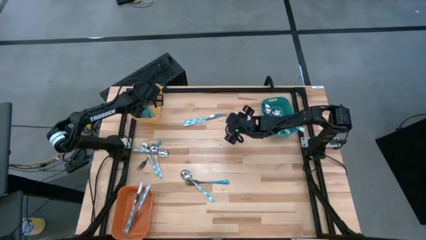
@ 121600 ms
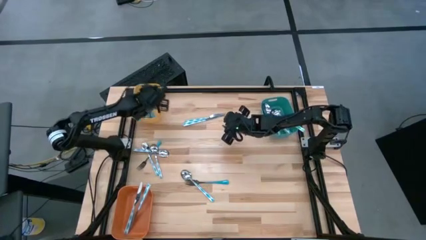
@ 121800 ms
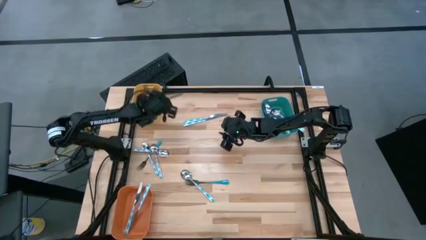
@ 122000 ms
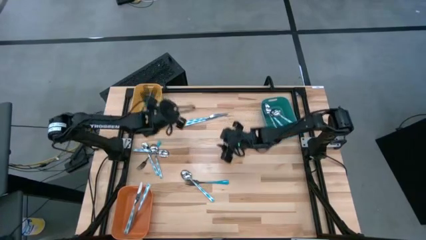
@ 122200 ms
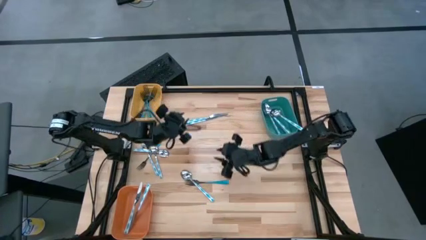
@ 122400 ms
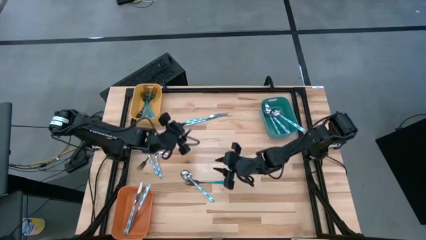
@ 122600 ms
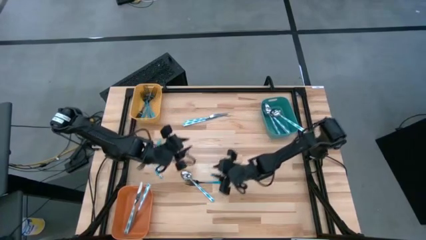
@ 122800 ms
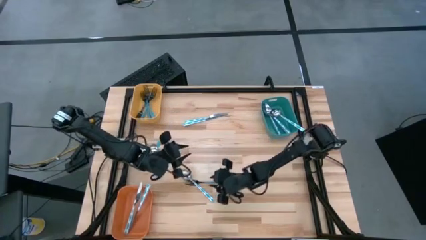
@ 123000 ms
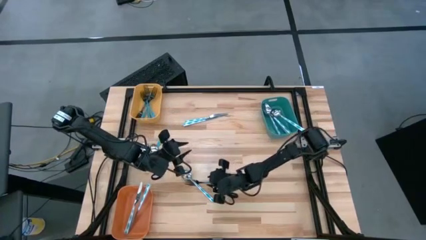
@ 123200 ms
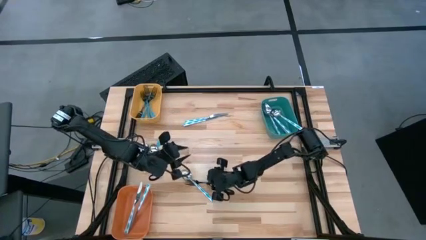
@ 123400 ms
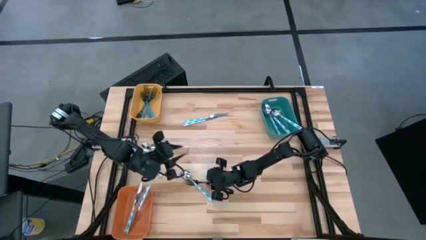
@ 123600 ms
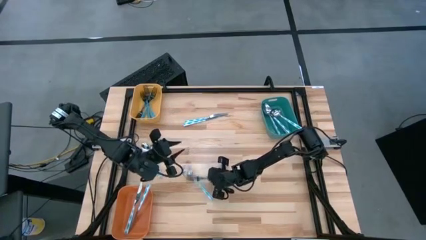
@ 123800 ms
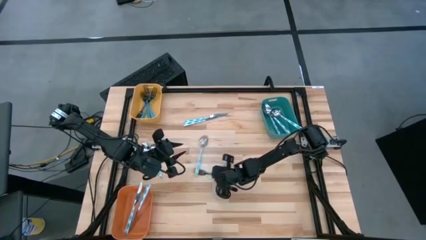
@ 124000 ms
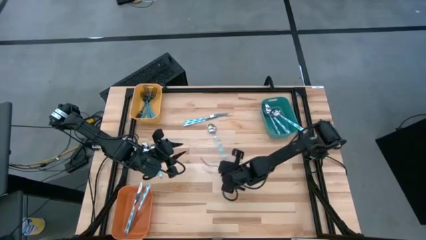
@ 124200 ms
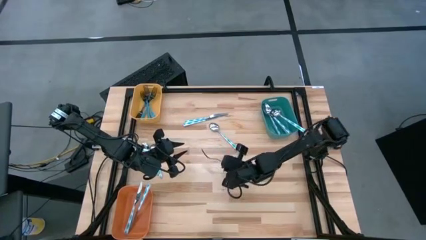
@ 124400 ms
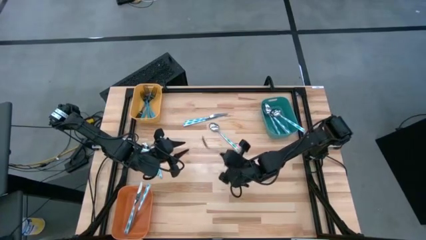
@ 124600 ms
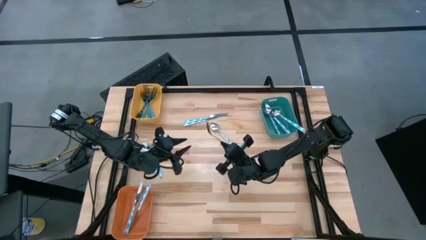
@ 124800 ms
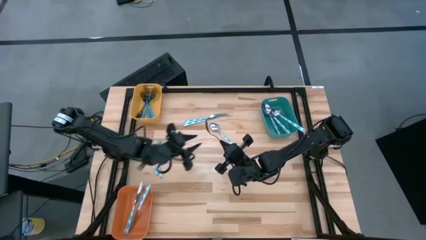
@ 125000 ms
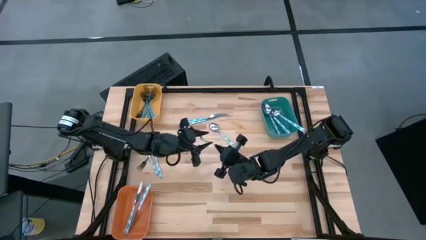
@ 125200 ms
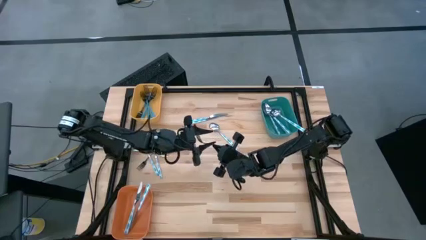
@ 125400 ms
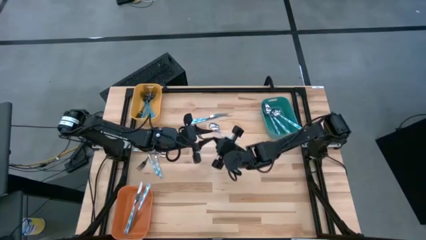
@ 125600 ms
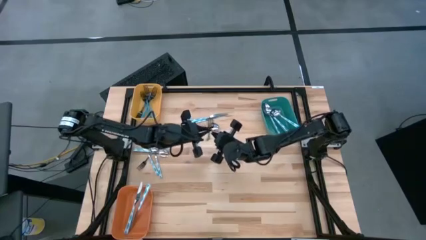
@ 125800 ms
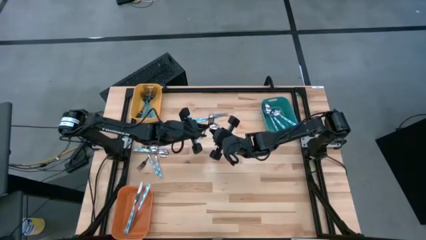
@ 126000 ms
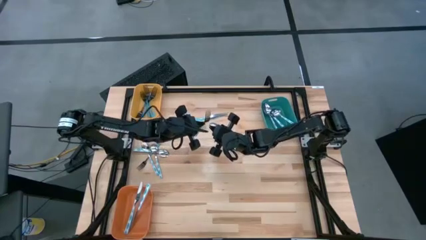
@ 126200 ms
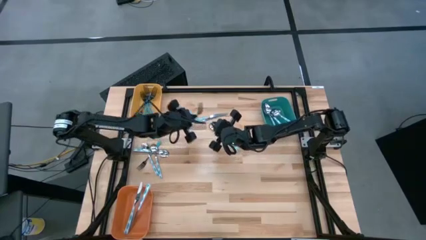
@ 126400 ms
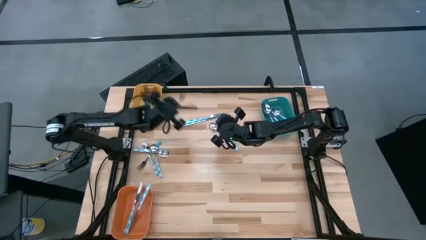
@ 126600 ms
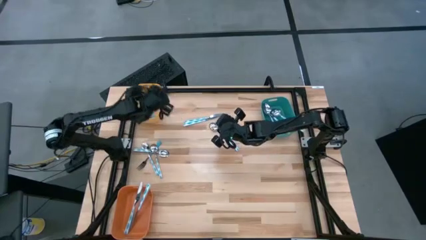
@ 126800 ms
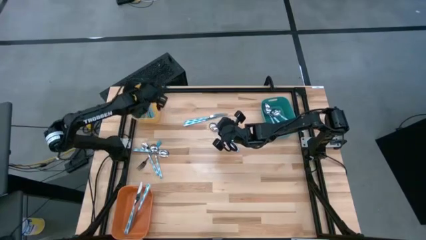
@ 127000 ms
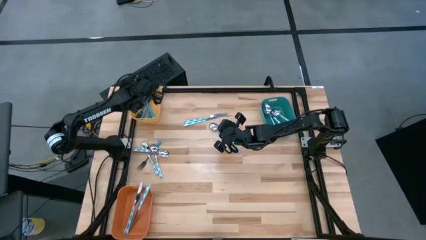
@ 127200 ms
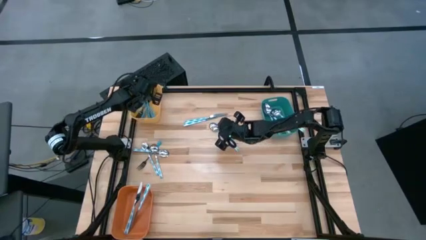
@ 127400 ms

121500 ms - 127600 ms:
Task: Sort silverware by color (type)
Put the blue fork into the yellow bin

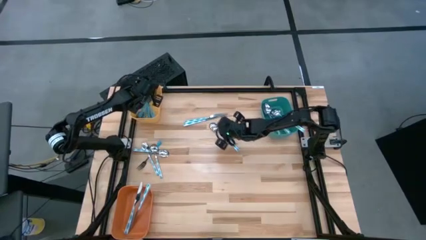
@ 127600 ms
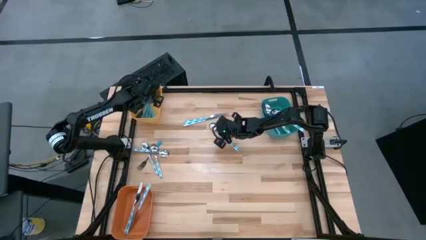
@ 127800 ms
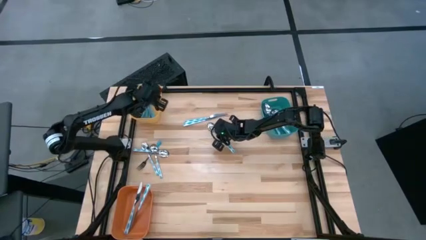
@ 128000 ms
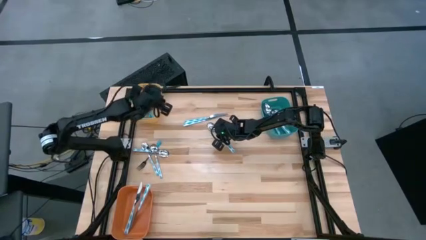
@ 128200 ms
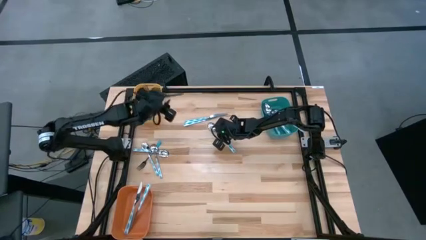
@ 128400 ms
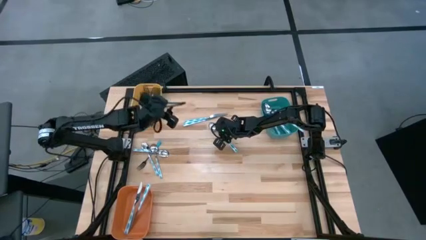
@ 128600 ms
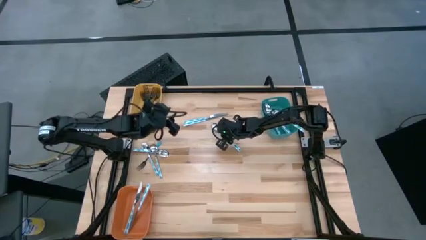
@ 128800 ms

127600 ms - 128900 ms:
Put the white-blue spoon into the blue bin

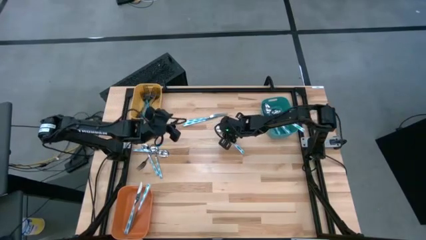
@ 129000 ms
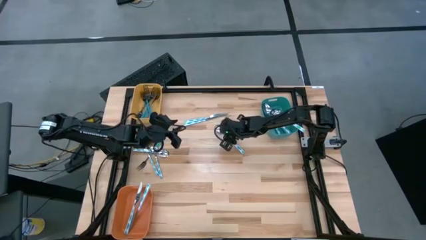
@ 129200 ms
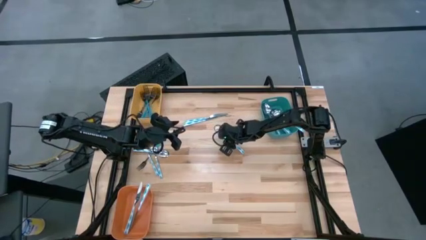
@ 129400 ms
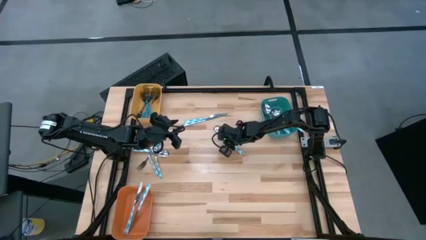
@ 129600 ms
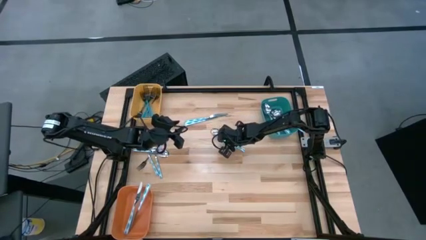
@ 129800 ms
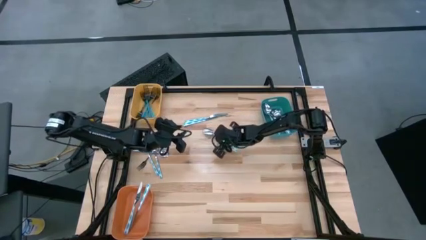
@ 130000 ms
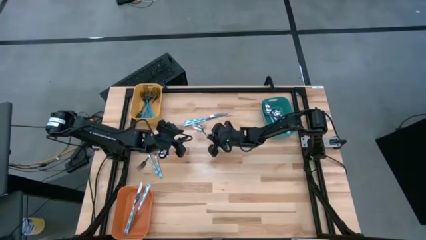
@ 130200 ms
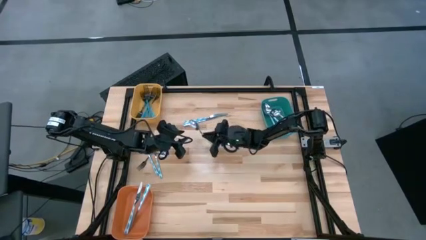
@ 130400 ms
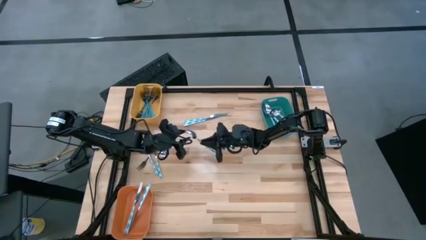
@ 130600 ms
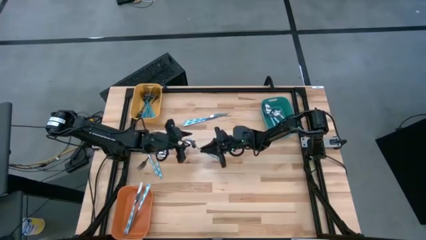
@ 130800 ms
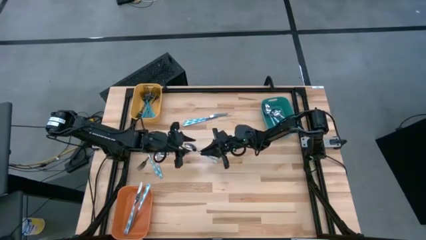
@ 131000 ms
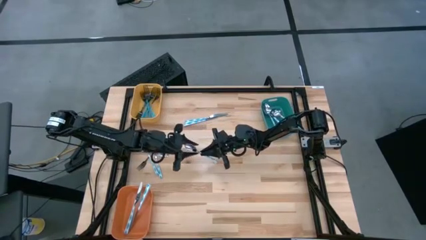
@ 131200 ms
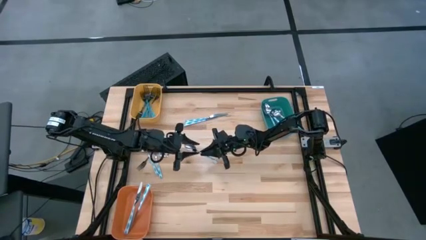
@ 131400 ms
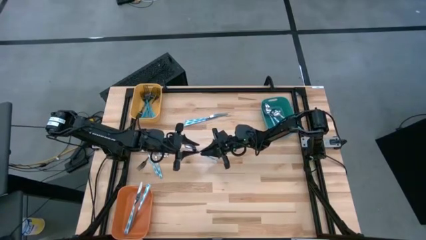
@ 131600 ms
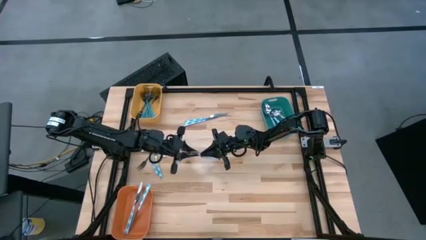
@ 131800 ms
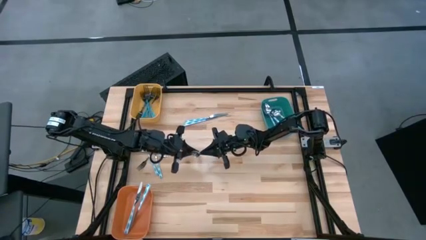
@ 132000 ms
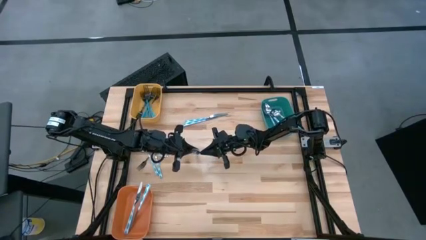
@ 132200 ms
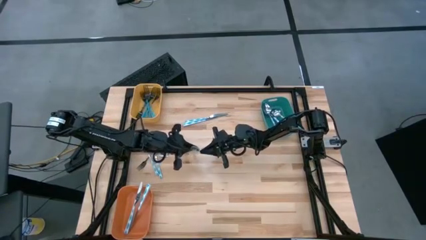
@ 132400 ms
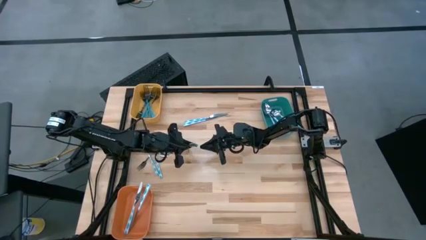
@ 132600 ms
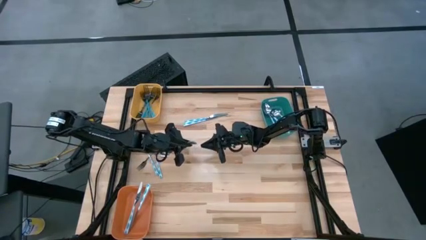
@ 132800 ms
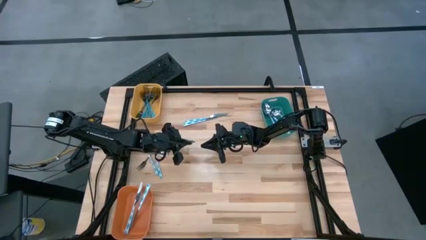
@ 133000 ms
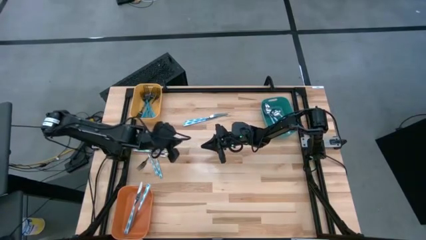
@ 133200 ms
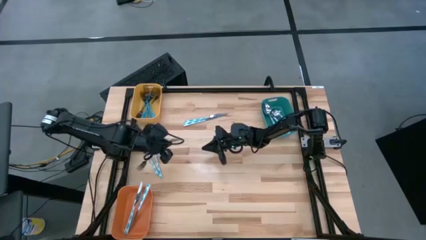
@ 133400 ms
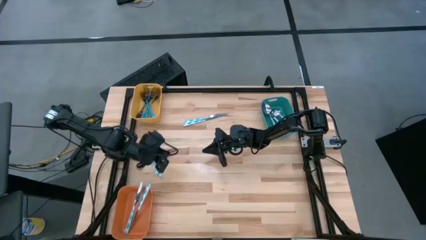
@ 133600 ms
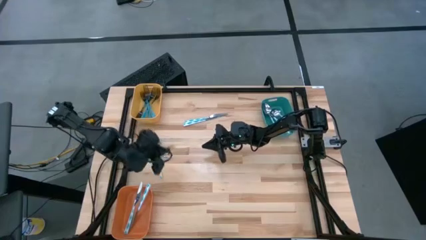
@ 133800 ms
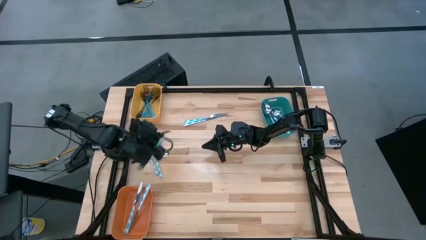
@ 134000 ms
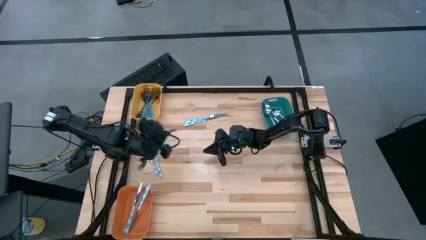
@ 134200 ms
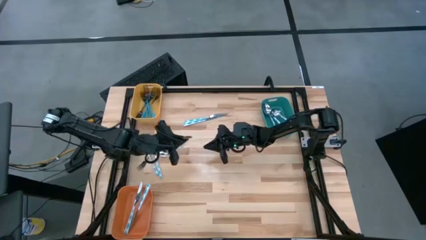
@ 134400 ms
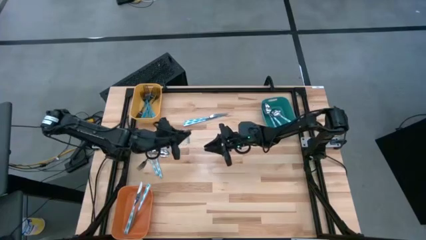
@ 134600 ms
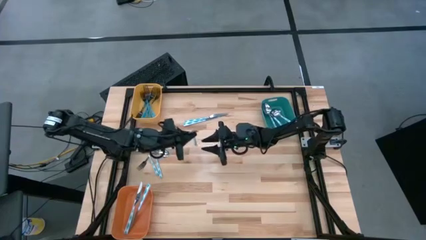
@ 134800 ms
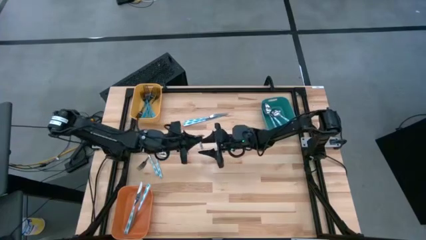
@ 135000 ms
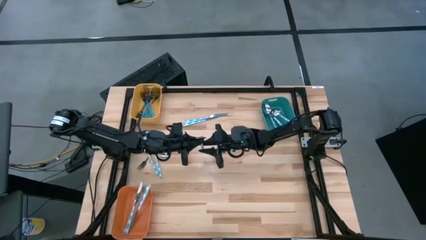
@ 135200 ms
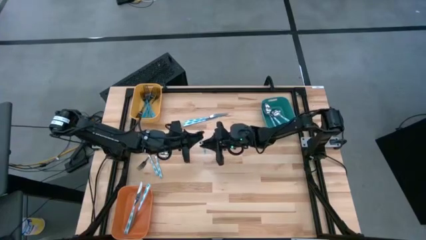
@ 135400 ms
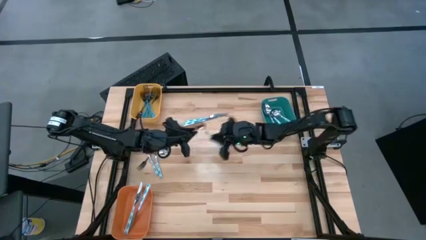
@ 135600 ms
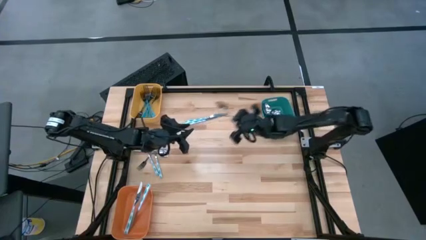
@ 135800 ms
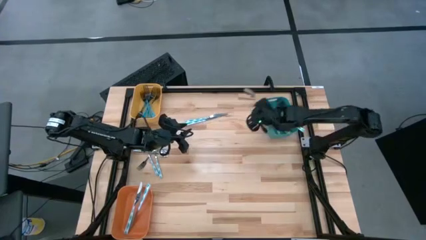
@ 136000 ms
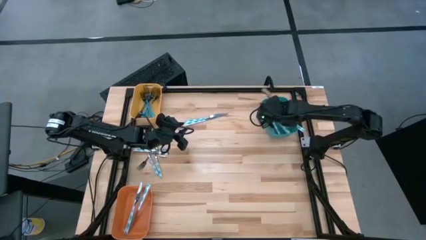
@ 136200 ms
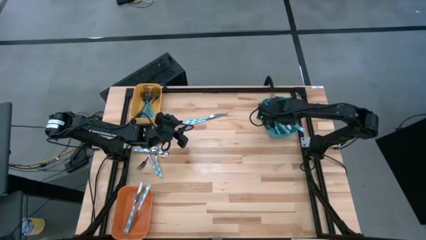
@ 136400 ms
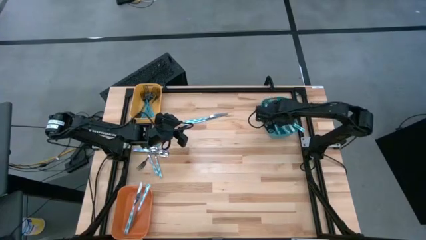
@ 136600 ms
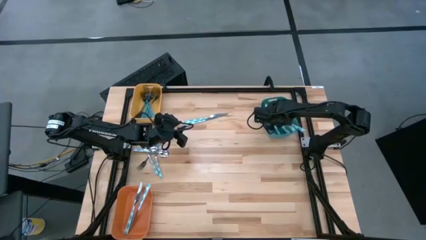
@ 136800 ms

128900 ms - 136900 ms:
Put the white-blue spoon into the blue bin

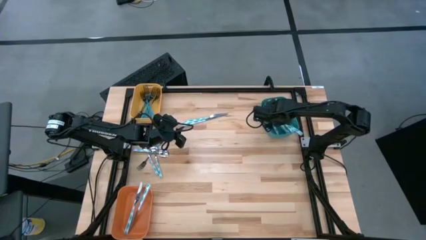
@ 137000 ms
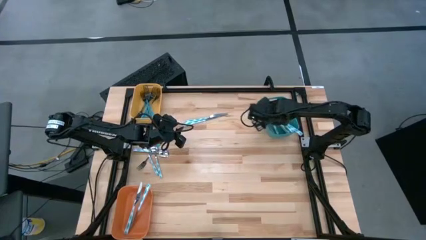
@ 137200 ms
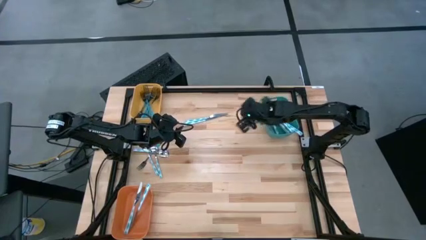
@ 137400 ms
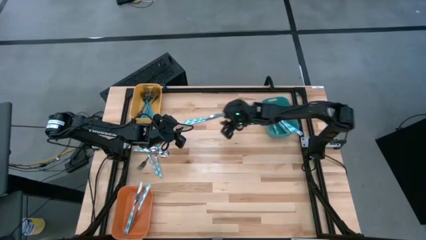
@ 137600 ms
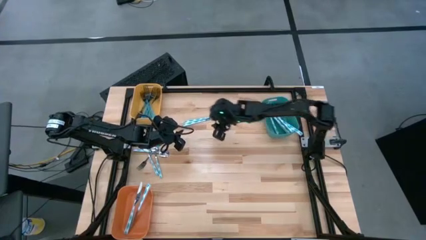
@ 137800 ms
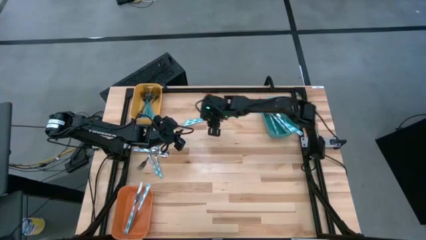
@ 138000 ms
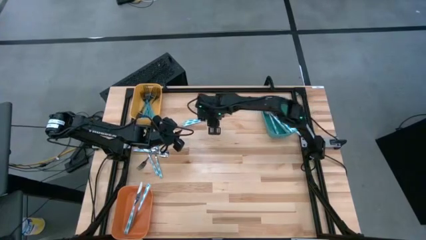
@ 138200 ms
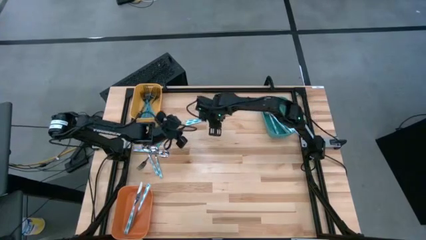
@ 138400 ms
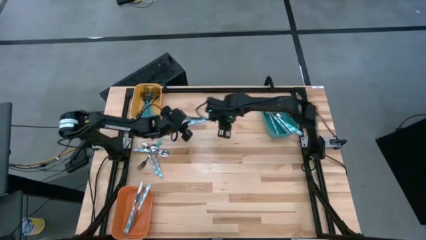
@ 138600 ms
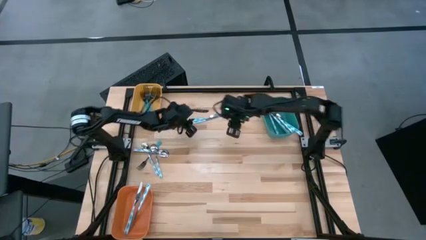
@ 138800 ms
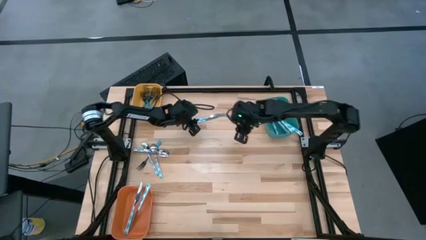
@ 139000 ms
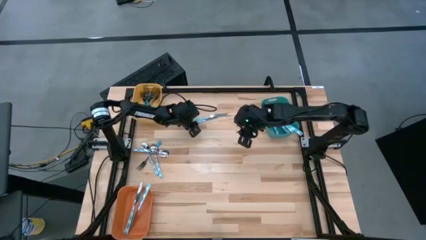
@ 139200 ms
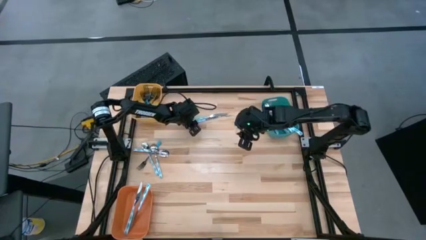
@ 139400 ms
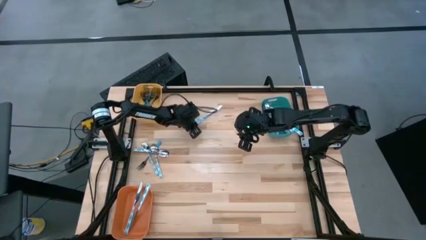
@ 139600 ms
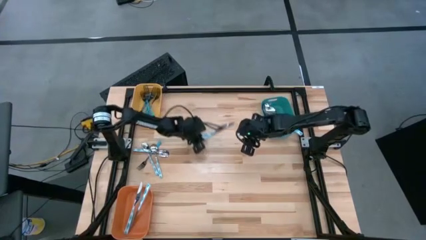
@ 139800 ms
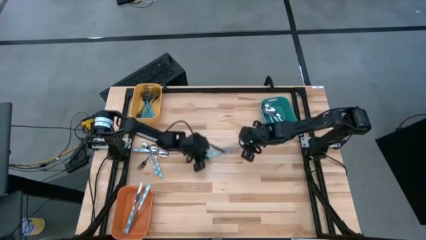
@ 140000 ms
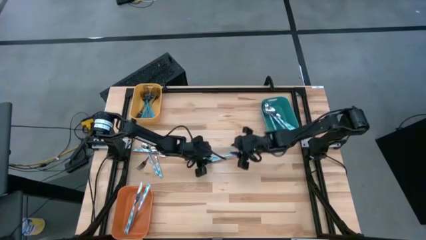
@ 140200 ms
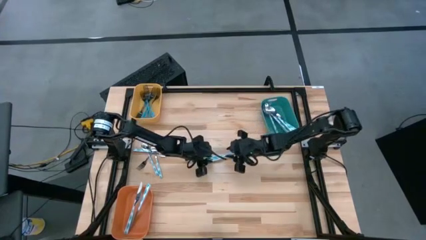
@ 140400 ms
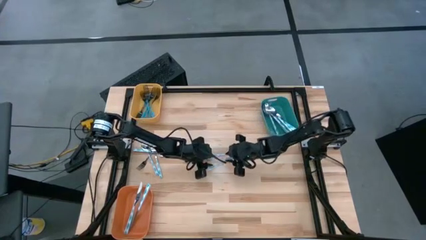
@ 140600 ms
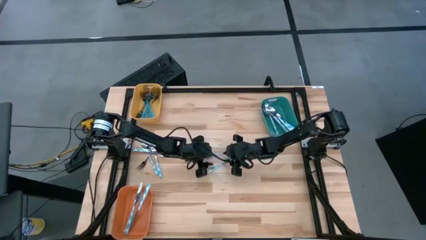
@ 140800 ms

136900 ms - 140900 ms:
Put the white-blue table knife into the orange bin
